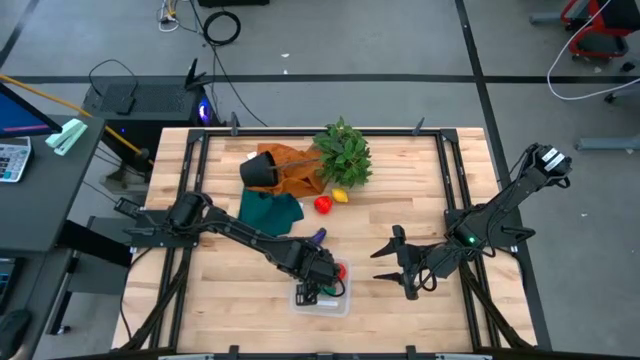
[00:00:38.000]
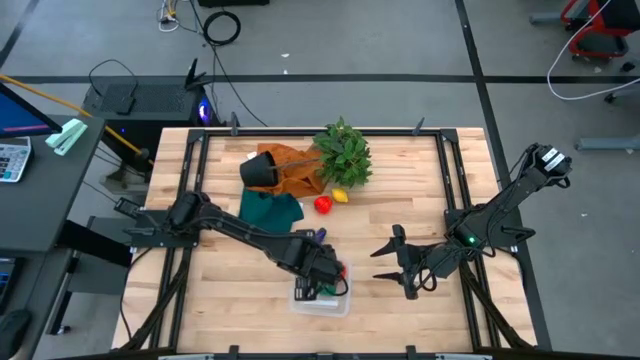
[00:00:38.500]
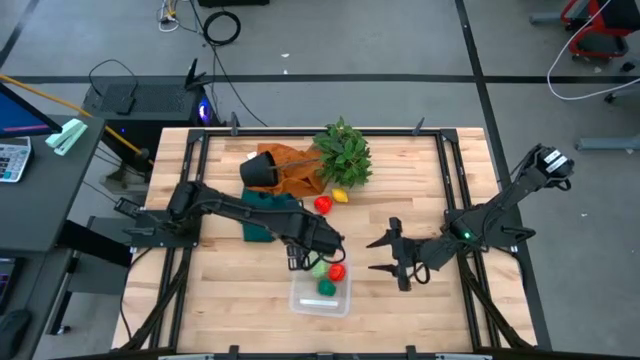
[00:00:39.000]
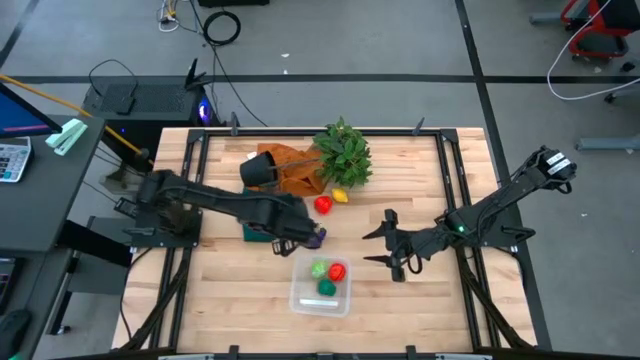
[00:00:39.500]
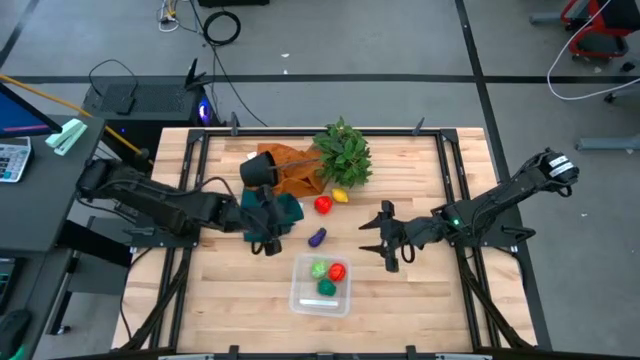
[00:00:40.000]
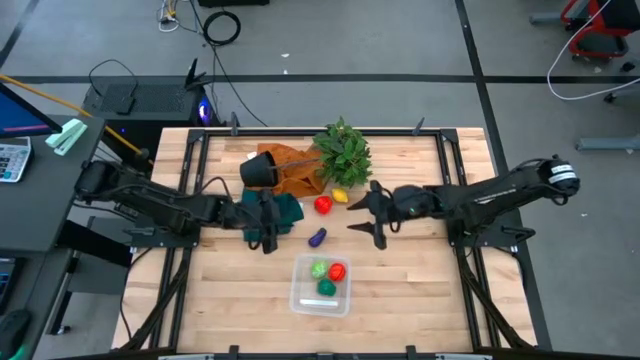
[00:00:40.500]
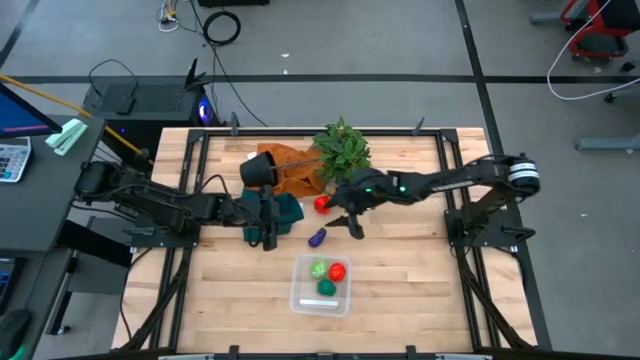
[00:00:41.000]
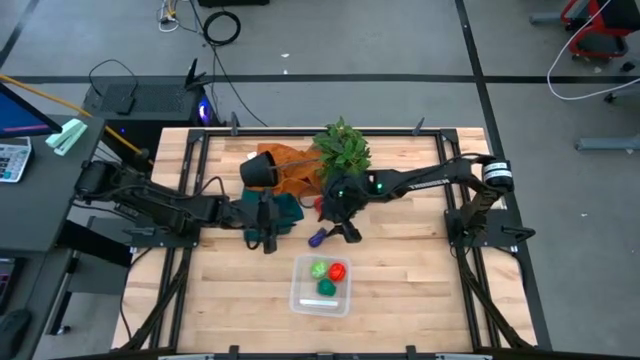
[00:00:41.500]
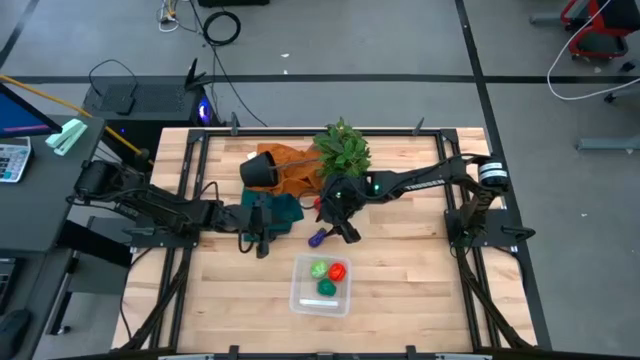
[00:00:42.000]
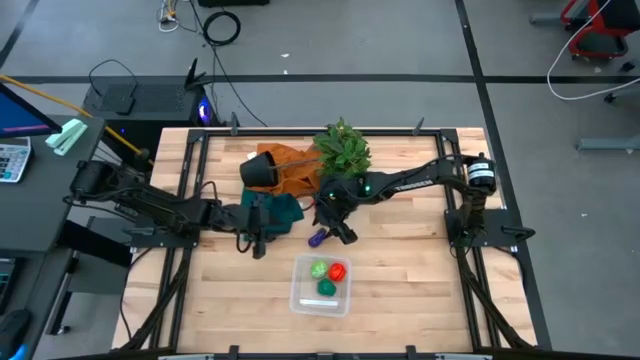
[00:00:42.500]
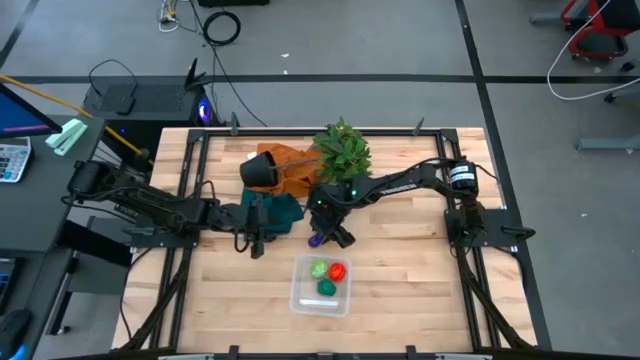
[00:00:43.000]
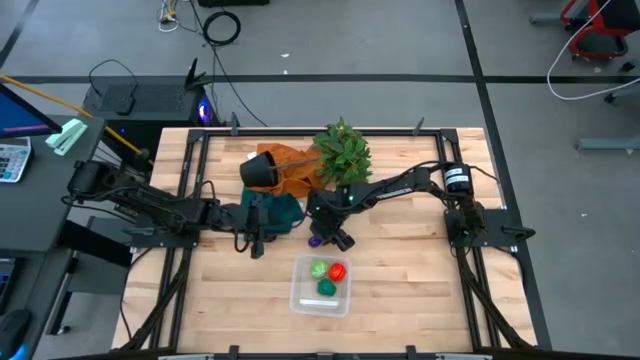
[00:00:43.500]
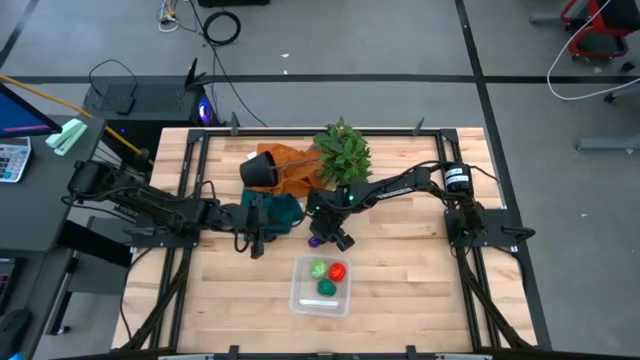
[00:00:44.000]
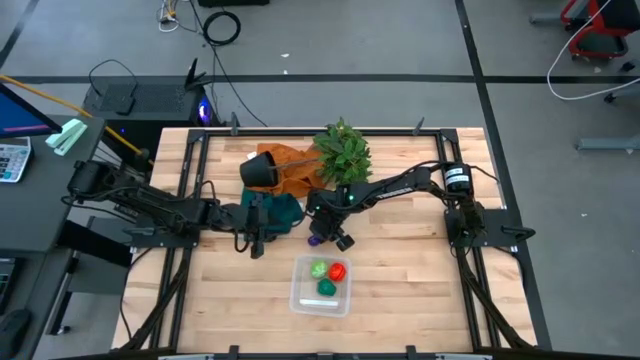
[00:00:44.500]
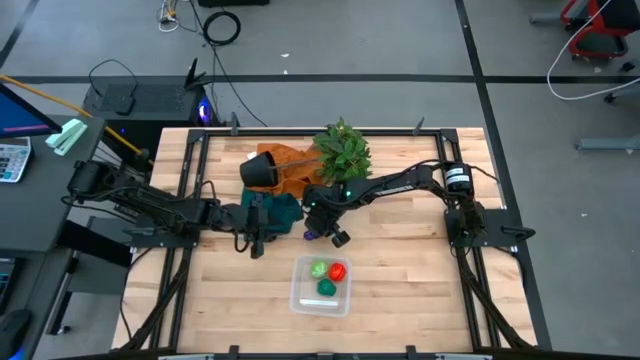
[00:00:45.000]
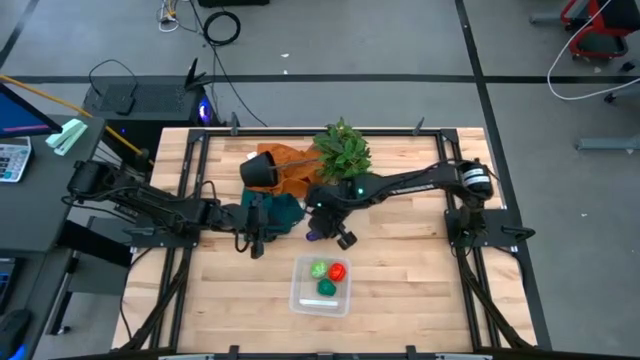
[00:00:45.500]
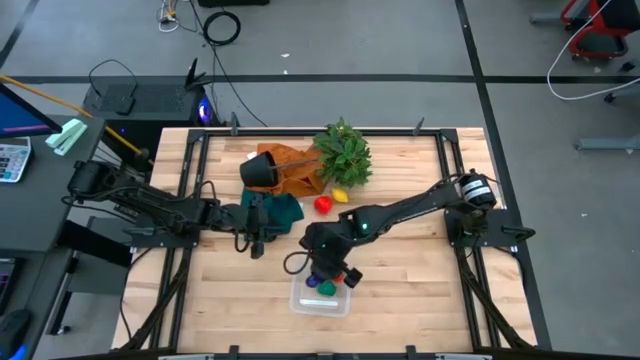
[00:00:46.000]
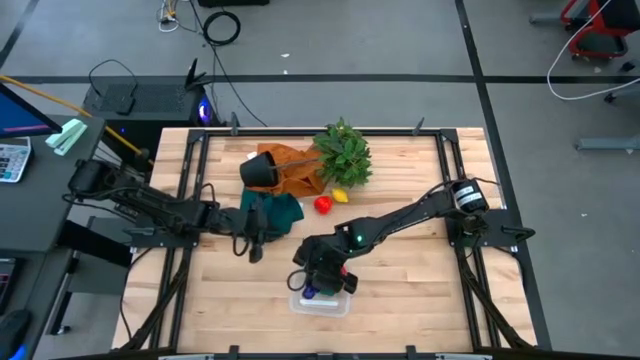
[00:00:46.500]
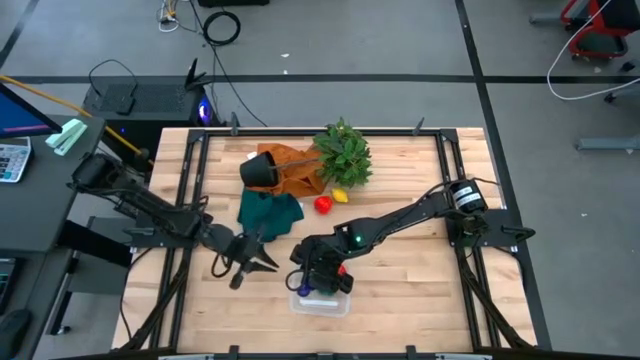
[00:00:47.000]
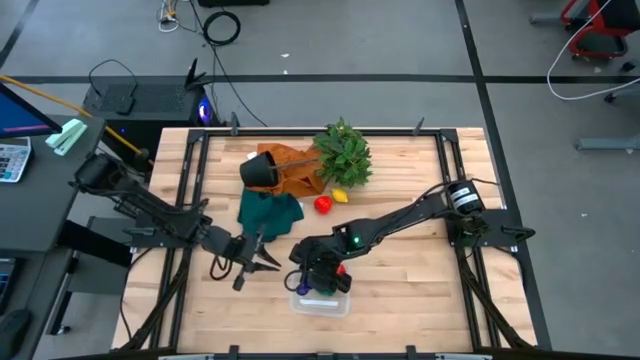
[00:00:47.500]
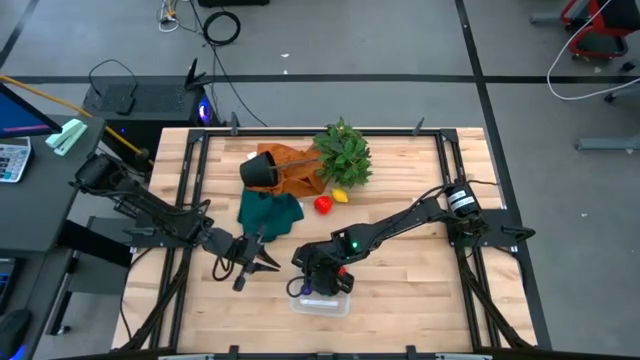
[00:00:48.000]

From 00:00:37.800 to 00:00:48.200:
Task: Pick and placing Produce into tupperware
Put the purple eggplant into the transparent bin

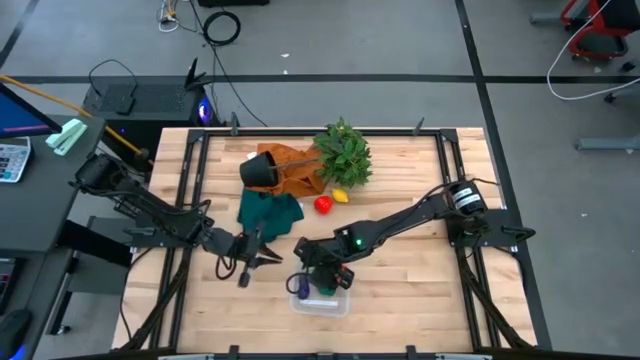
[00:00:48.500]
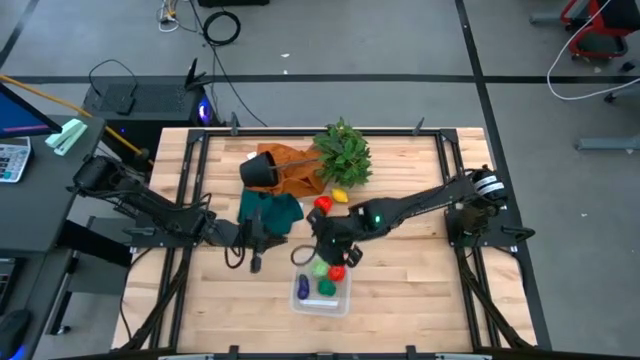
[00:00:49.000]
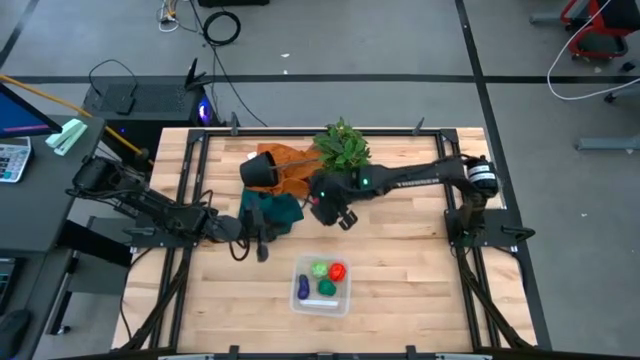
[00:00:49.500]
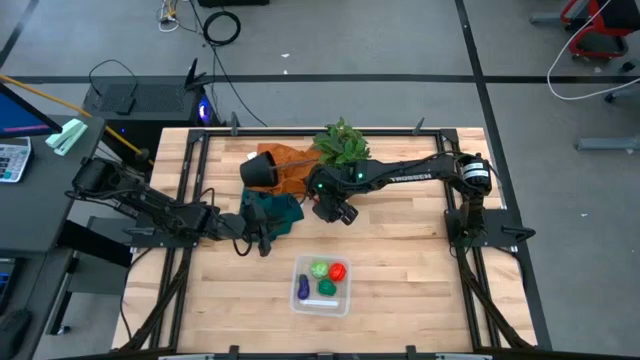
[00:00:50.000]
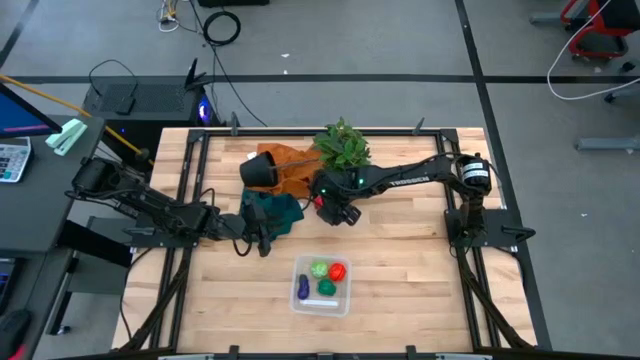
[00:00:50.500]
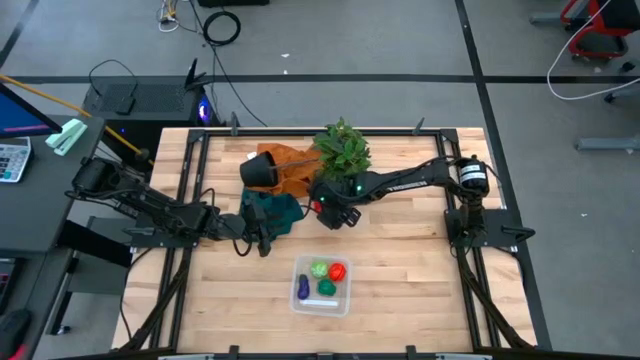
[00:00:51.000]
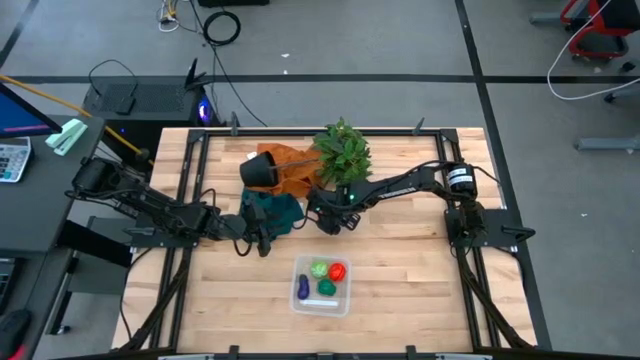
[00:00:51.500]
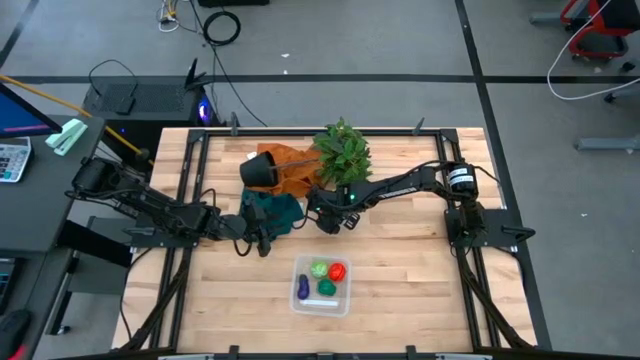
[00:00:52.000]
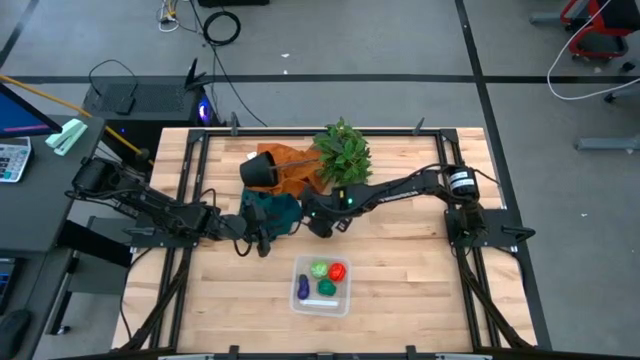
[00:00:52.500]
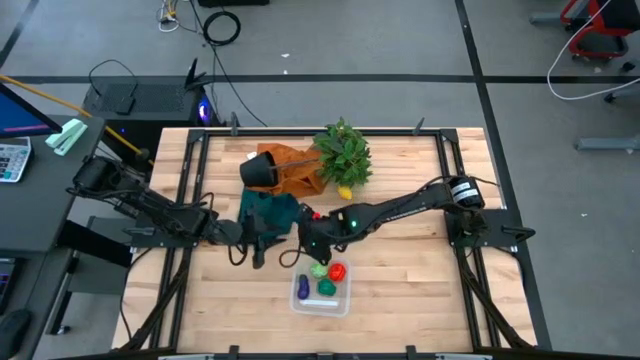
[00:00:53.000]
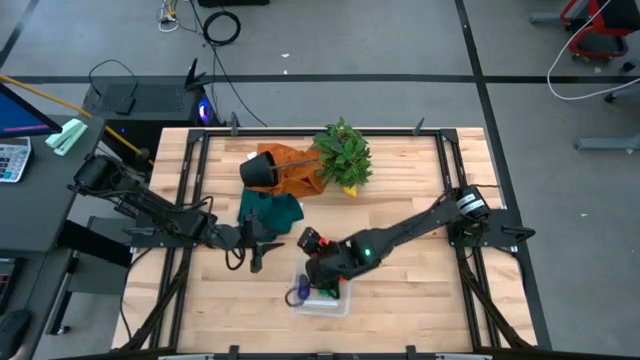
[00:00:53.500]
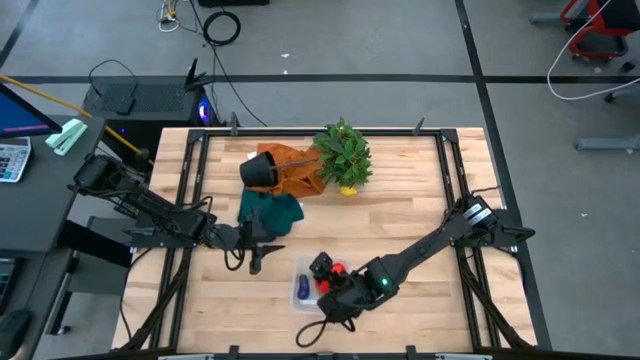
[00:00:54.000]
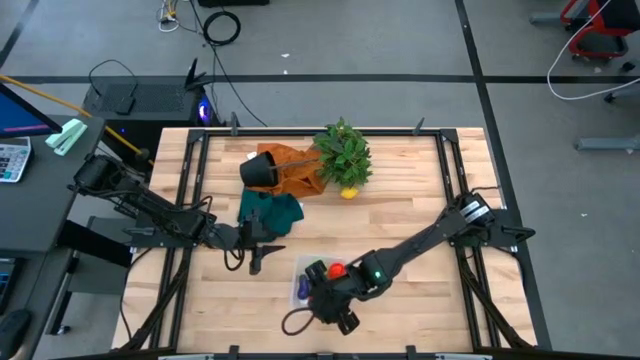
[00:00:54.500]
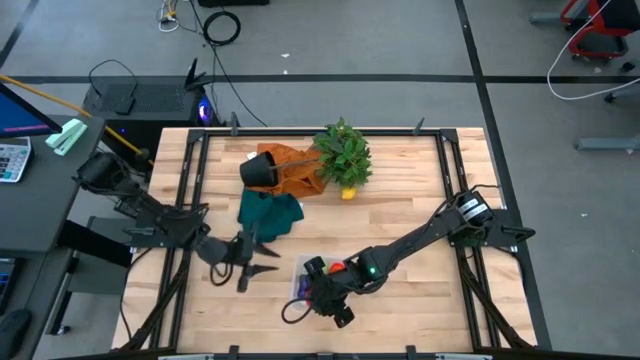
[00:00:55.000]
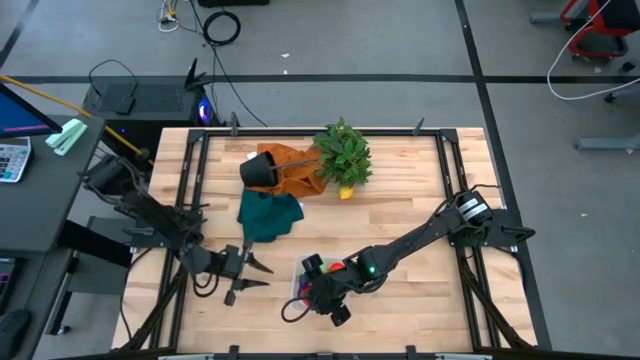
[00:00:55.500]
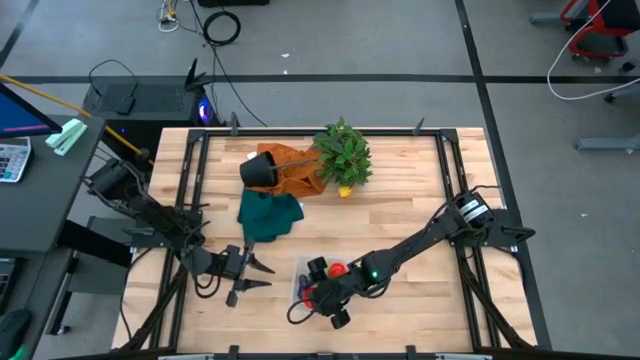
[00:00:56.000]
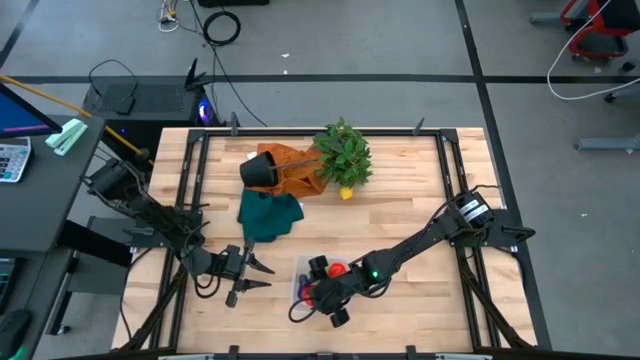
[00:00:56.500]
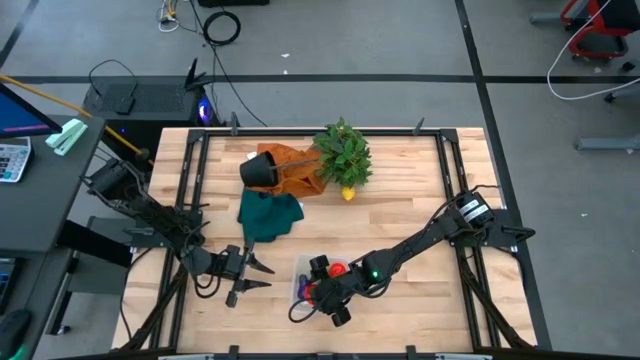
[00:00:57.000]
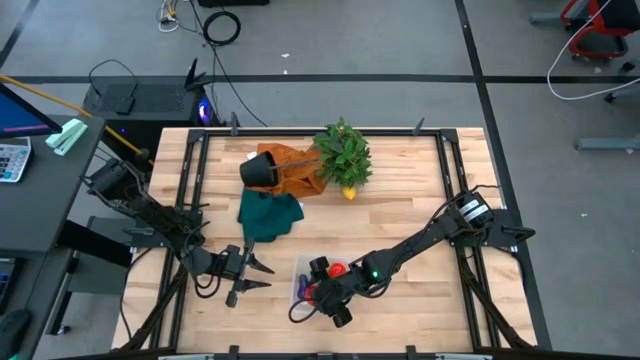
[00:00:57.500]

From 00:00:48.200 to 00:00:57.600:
Put the red apple into the transparent bin

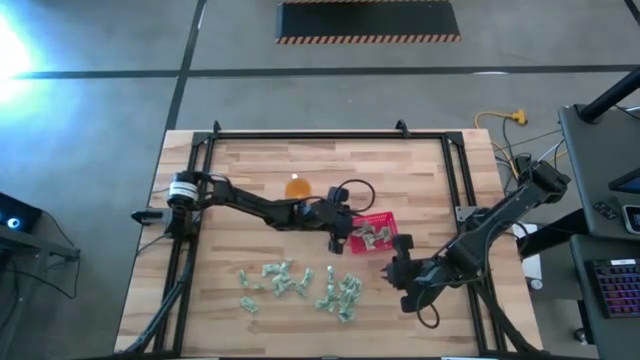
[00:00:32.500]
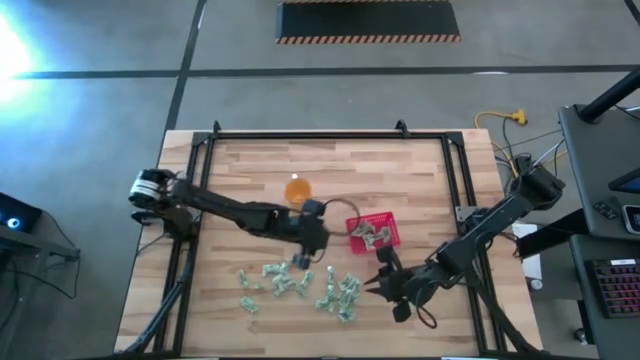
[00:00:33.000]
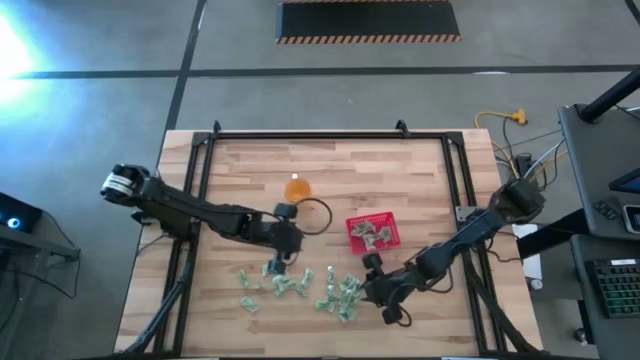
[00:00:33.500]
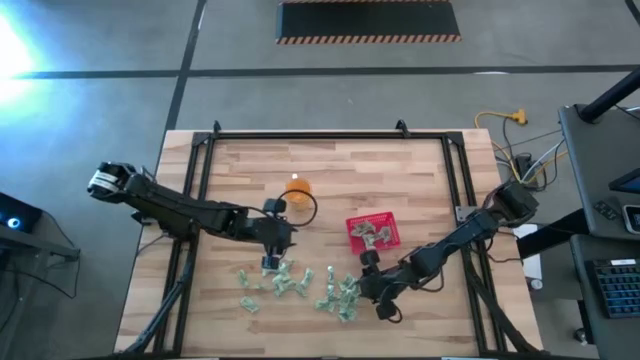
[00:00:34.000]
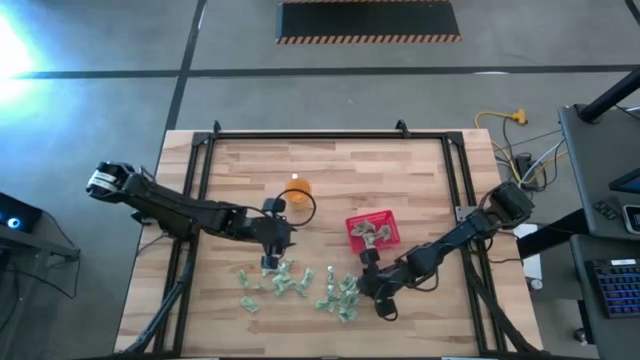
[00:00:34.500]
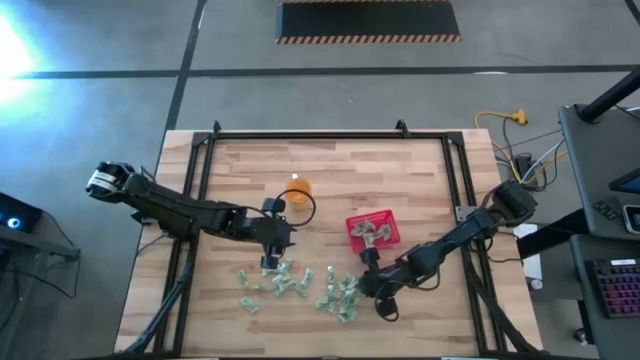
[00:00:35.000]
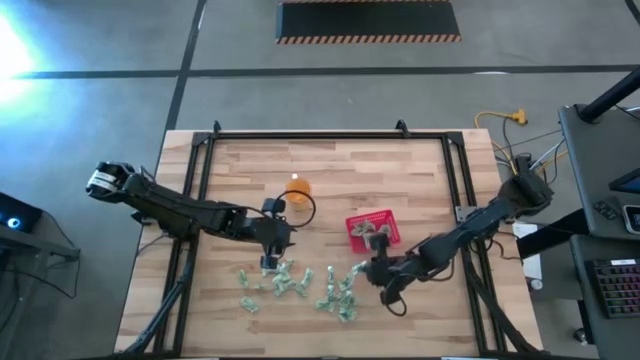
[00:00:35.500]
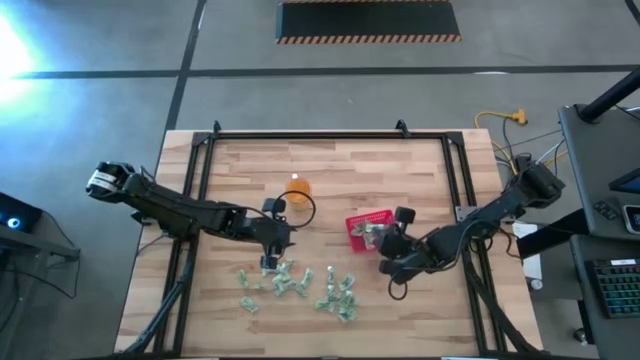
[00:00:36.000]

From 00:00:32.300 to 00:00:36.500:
Task: Pick and place Stevia / Truvia into bins
Put the stevia packet into the basket
